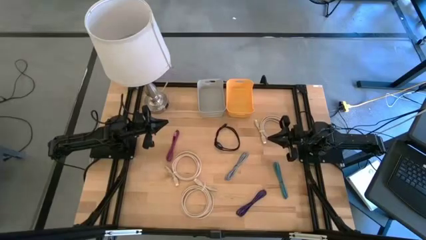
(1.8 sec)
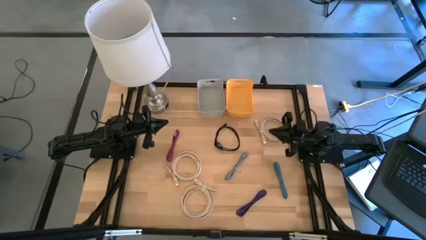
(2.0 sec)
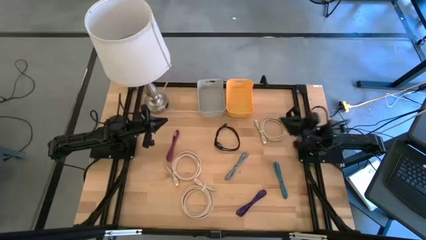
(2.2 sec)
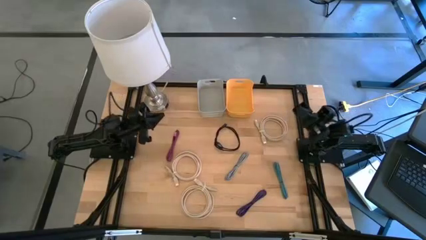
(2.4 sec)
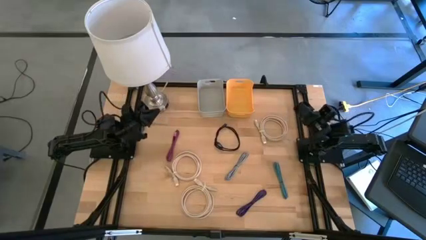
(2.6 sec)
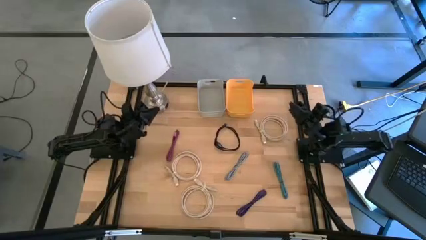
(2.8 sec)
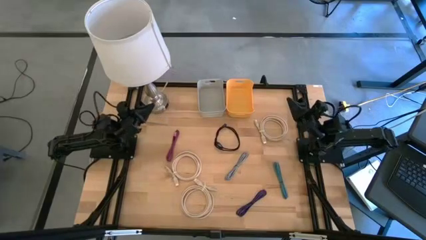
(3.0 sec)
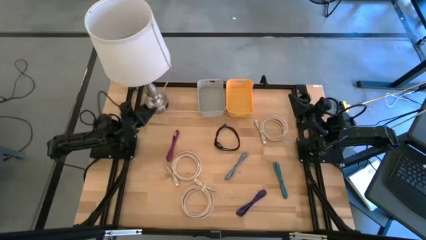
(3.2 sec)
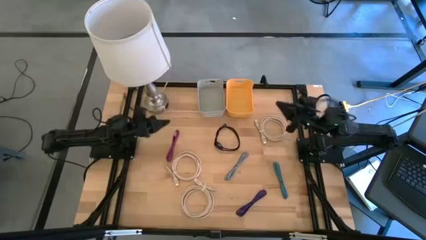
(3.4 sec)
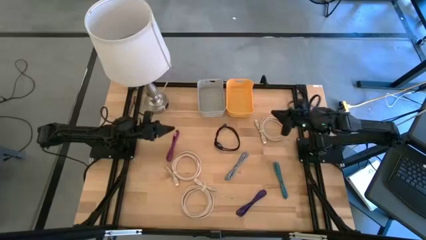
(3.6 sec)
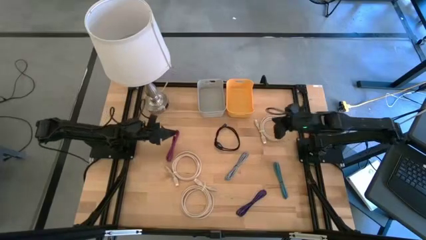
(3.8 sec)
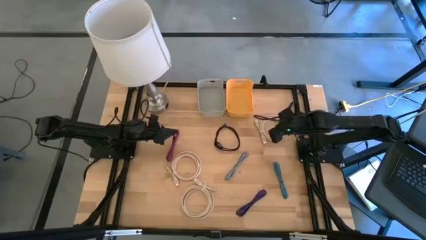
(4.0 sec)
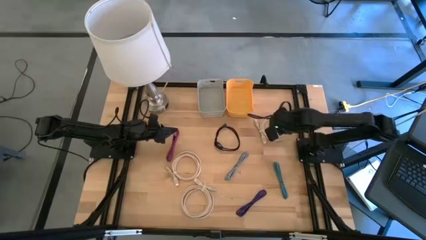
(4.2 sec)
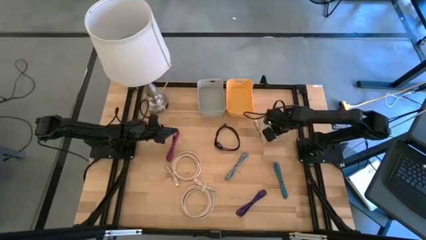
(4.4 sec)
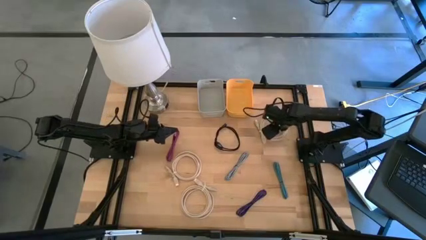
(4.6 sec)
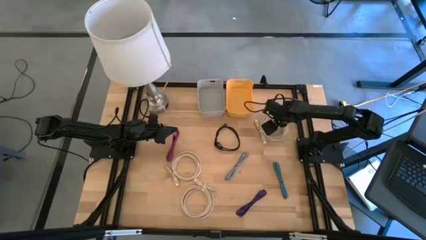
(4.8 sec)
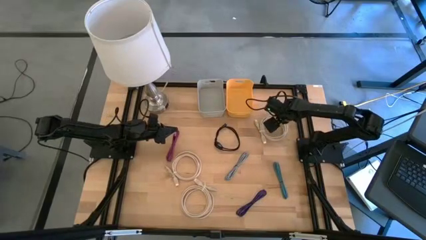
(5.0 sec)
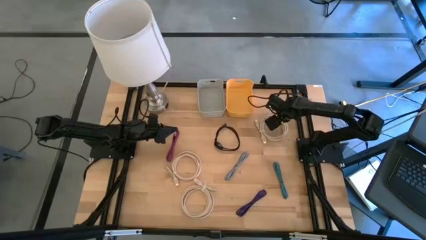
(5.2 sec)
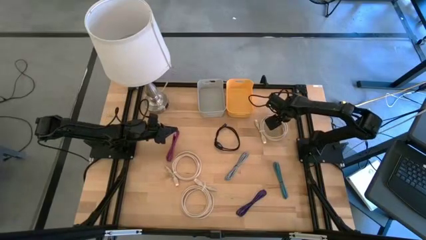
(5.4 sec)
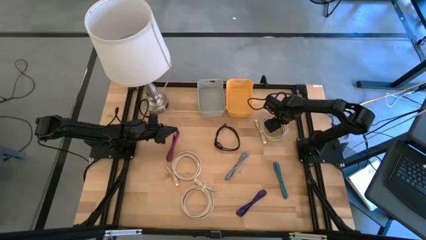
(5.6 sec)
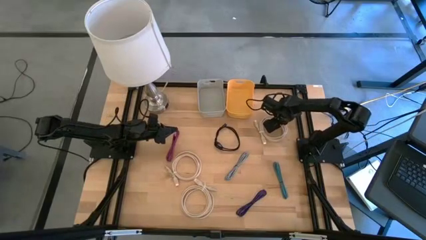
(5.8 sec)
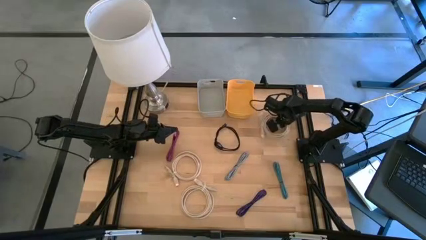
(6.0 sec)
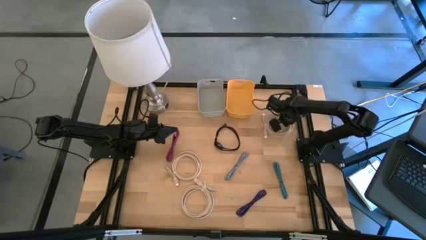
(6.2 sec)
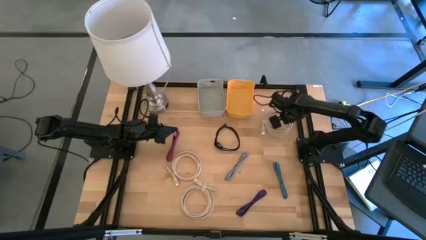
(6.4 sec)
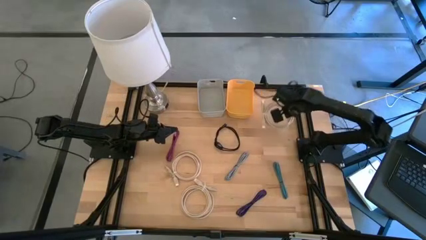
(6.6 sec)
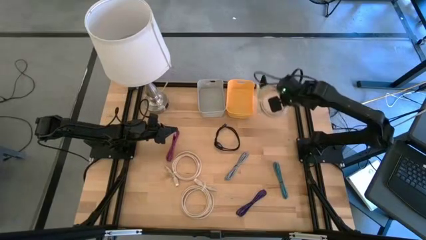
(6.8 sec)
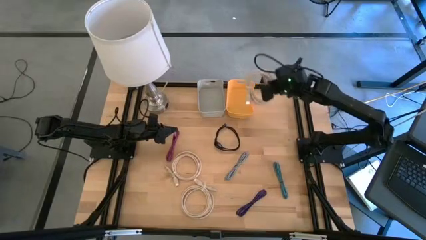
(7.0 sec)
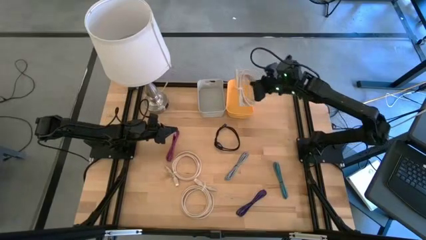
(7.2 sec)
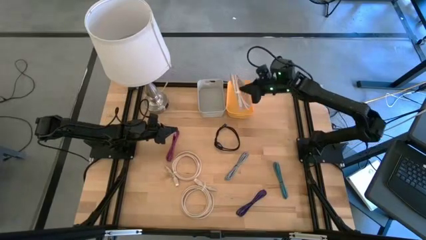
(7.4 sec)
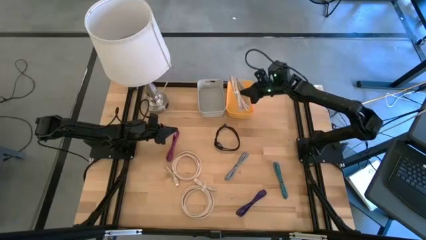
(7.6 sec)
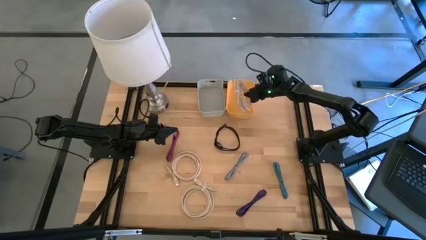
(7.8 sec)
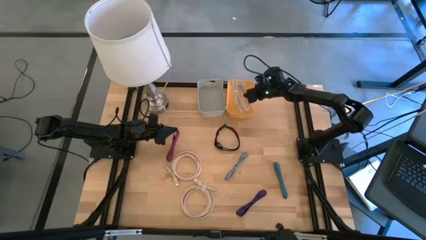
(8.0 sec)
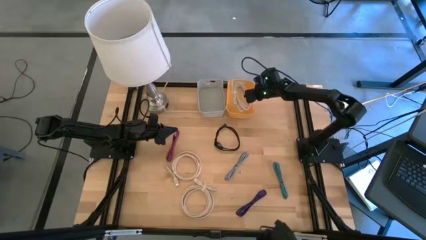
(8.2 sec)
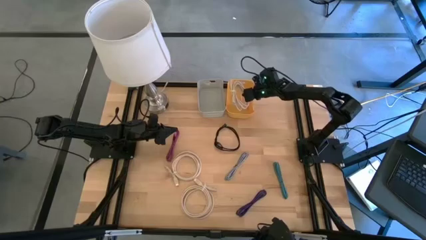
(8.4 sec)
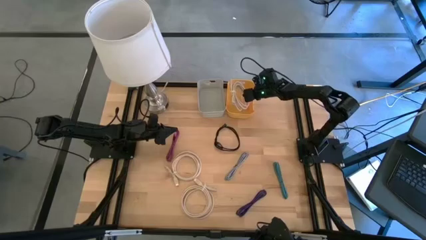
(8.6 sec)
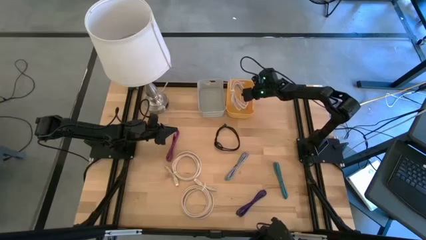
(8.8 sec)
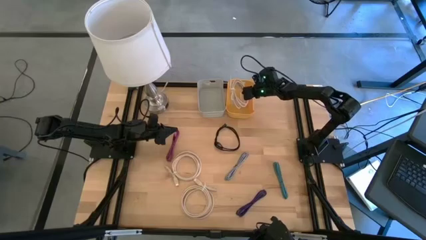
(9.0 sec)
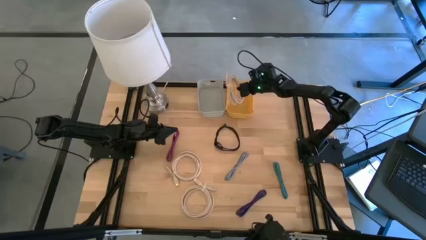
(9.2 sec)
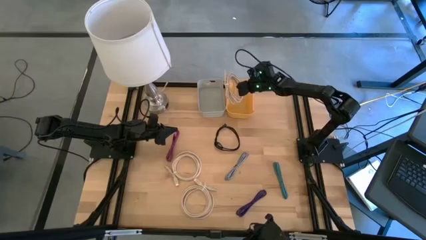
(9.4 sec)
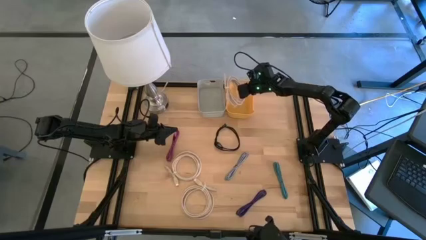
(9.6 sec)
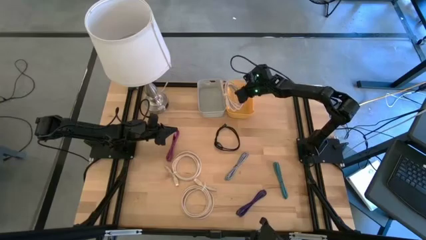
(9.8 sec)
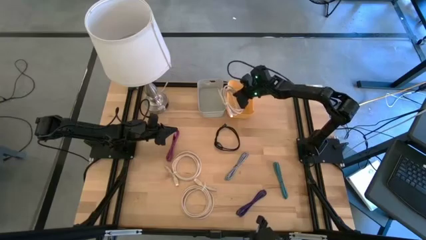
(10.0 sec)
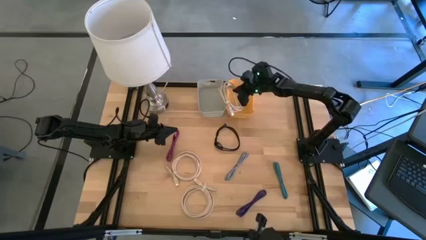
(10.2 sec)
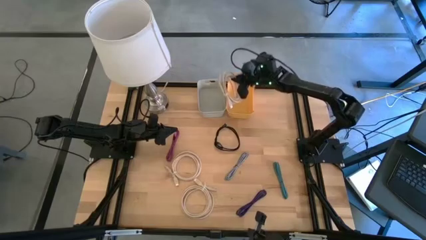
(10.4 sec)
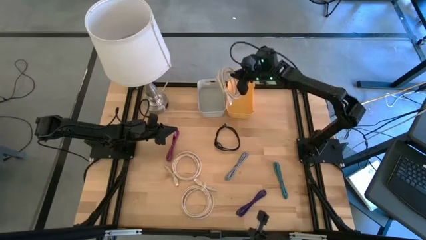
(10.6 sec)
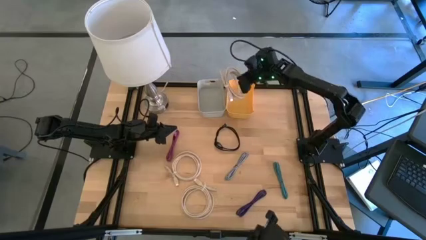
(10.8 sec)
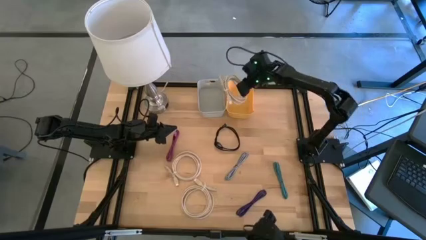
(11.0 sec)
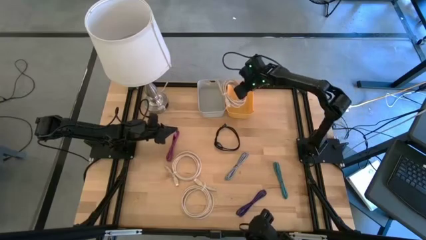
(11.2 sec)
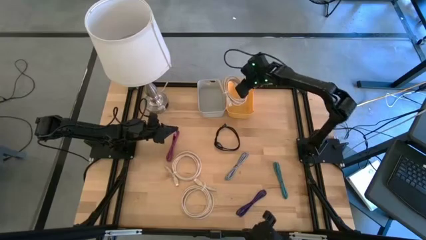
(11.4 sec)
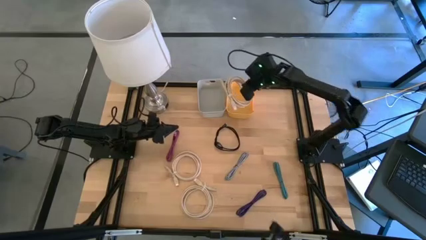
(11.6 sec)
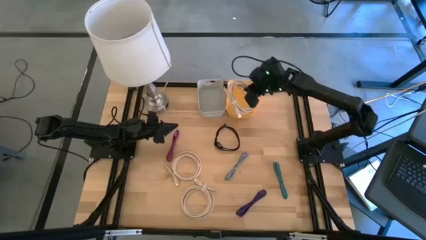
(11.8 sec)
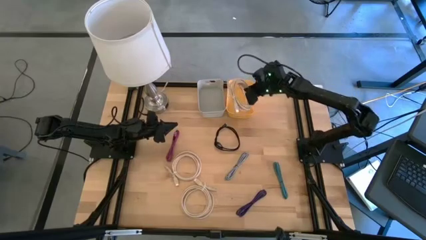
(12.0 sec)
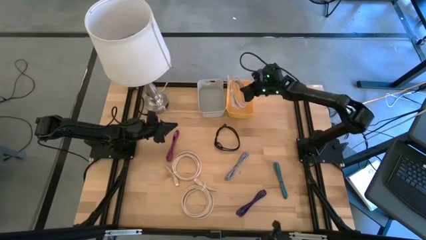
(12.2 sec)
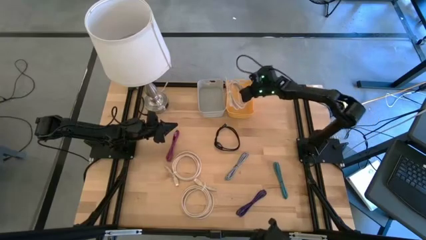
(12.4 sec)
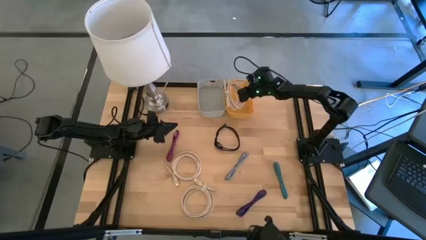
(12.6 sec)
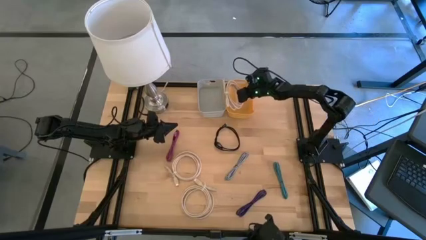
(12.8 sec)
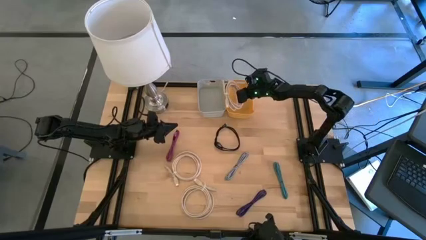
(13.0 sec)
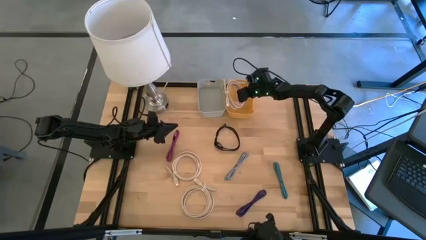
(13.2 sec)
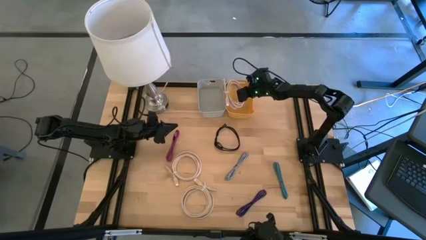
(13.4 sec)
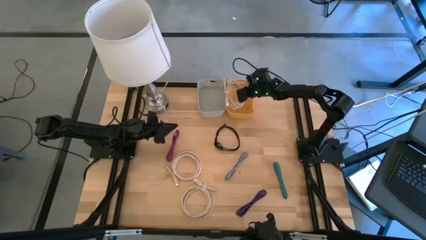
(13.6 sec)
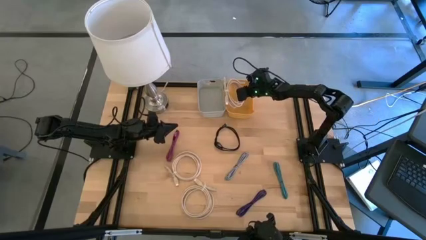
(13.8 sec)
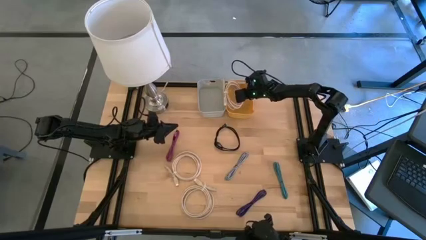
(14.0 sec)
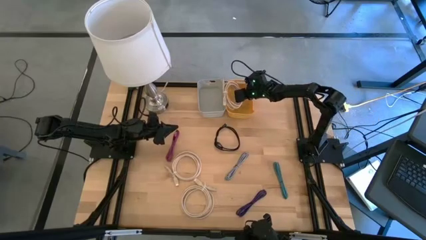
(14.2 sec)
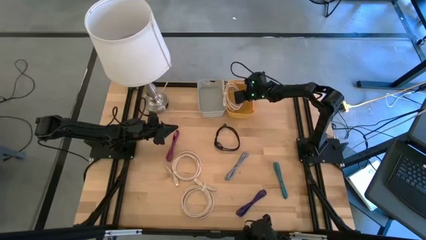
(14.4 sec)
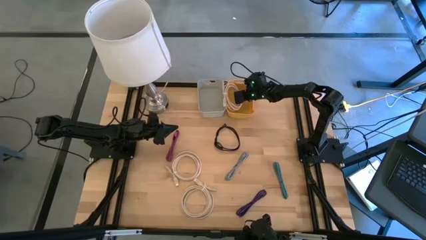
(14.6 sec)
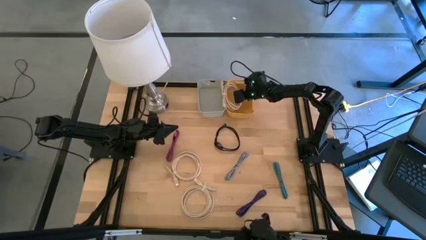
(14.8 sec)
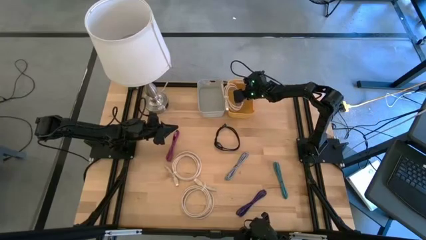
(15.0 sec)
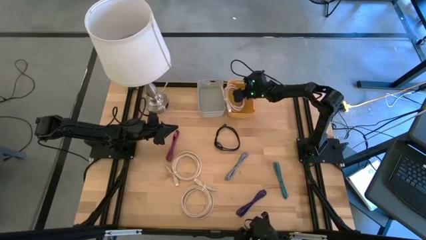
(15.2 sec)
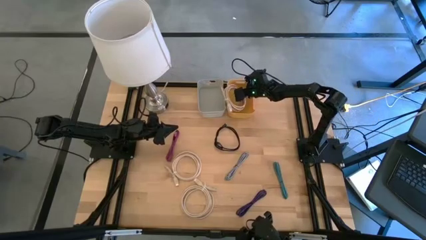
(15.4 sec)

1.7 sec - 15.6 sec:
Put the top white HDMI cable into the yellow bin
